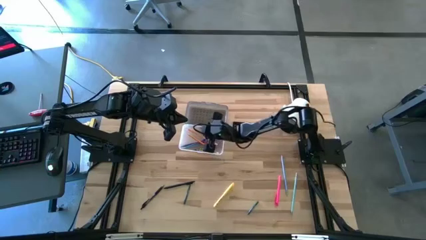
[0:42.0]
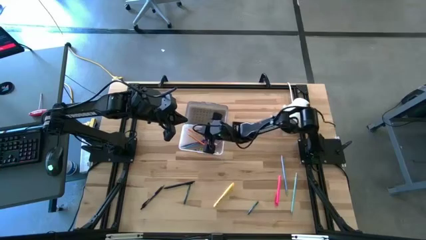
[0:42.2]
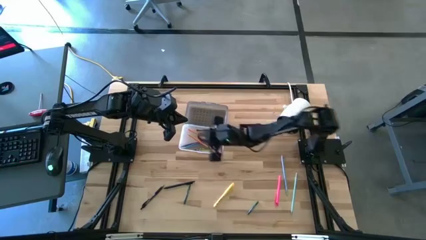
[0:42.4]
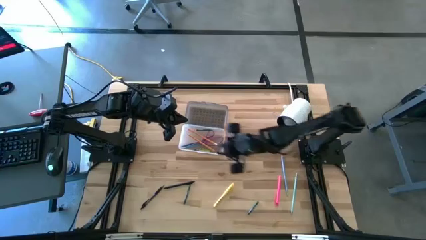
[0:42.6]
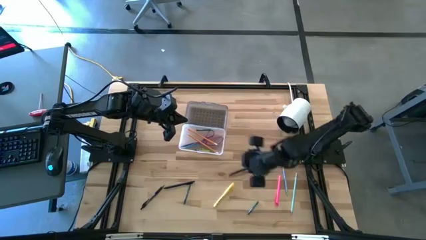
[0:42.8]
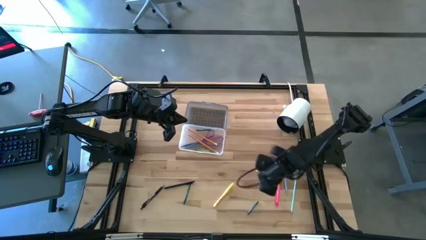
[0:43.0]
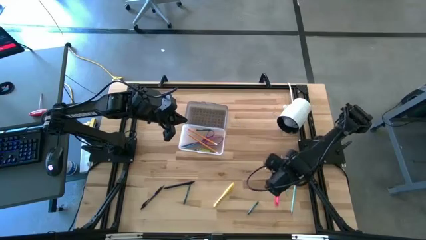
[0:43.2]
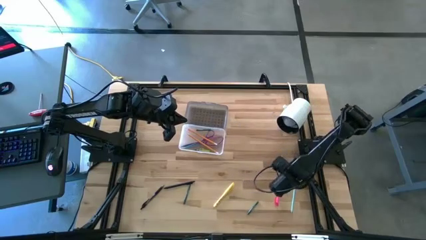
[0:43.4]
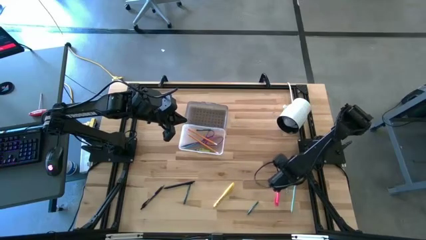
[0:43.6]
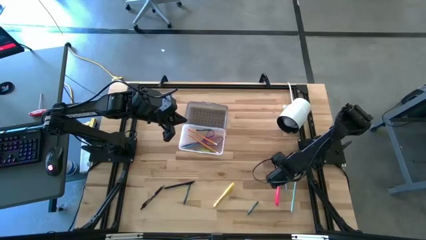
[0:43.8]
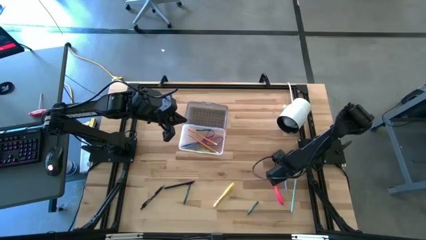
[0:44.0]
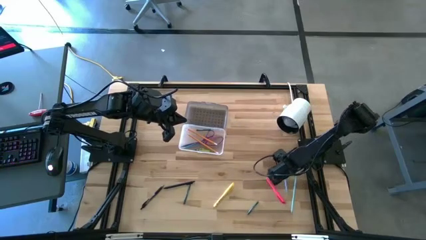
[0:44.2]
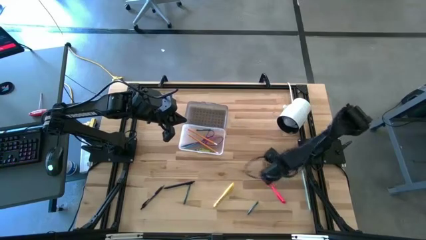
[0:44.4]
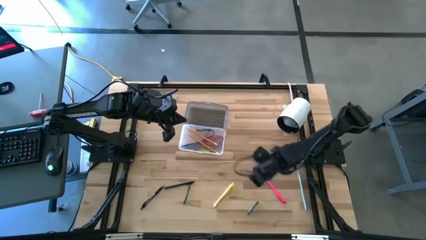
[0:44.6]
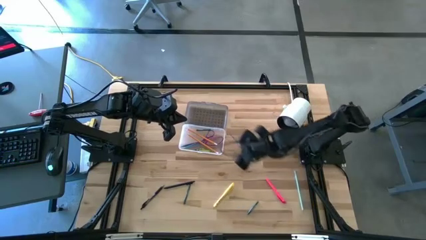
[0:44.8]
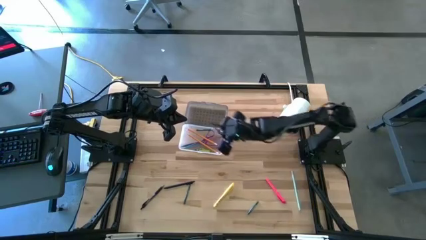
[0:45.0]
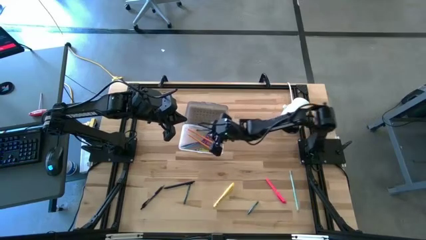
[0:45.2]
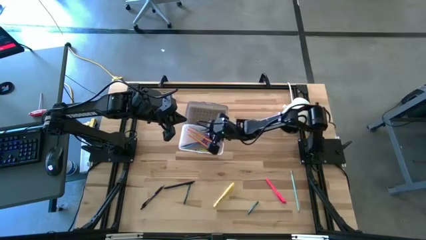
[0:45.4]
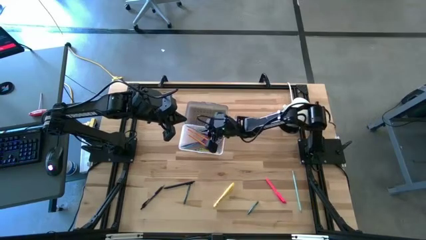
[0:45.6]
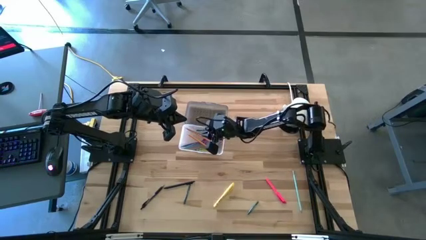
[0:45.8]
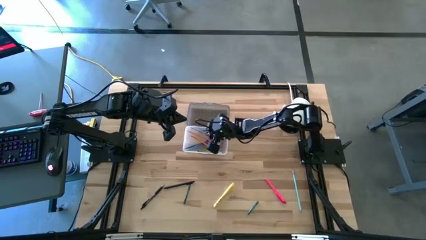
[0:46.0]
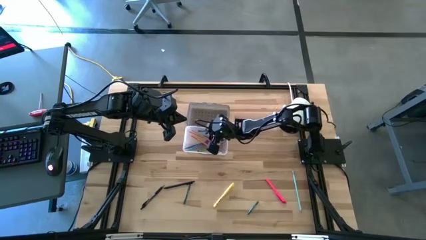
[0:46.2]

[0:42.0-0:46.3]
Task: Pick & place school supplies into a supply box
Put the blue pencil into the black box

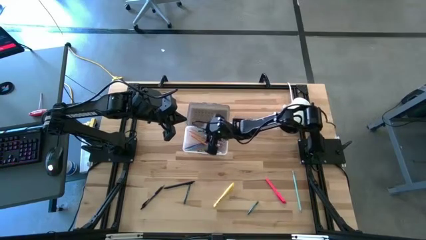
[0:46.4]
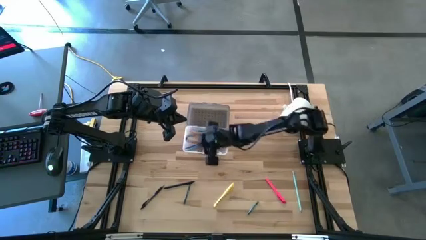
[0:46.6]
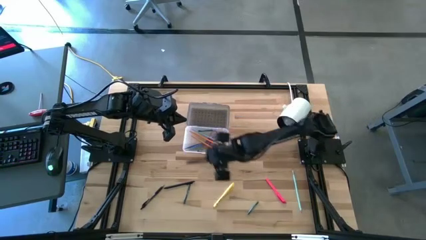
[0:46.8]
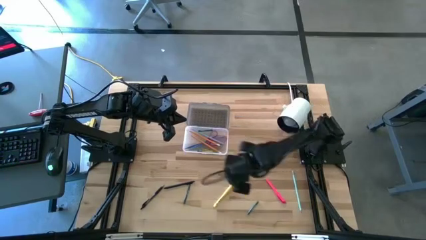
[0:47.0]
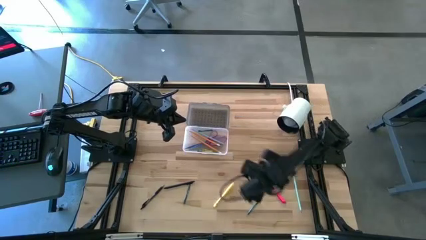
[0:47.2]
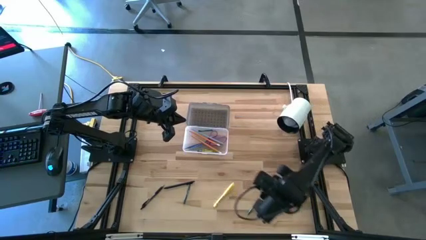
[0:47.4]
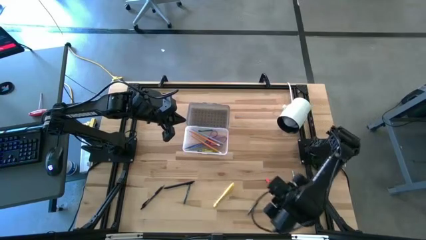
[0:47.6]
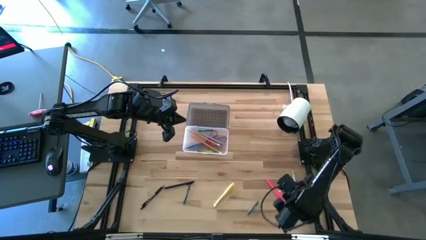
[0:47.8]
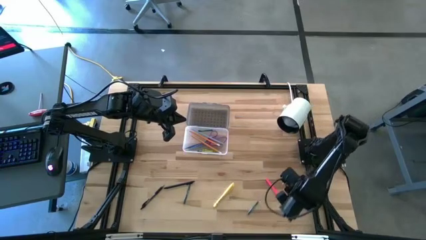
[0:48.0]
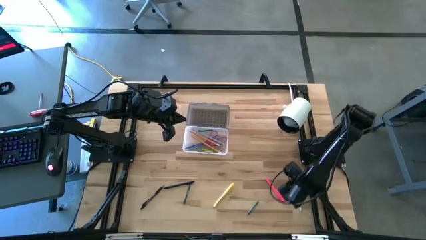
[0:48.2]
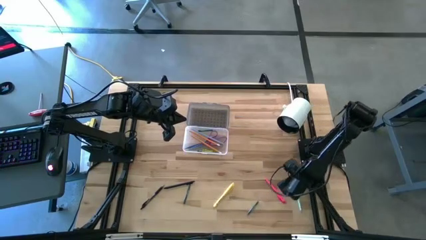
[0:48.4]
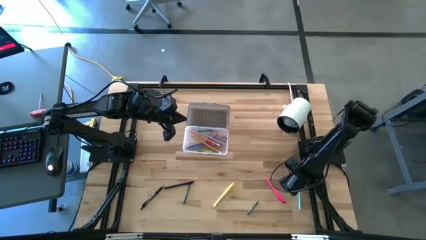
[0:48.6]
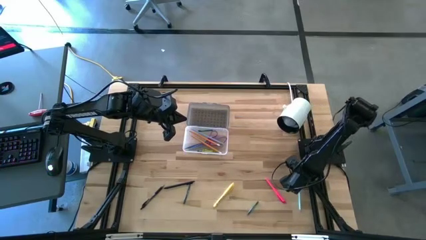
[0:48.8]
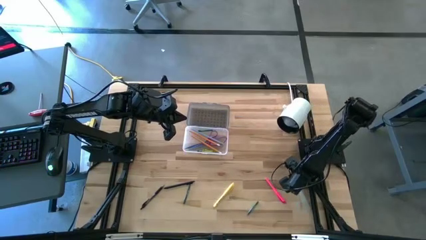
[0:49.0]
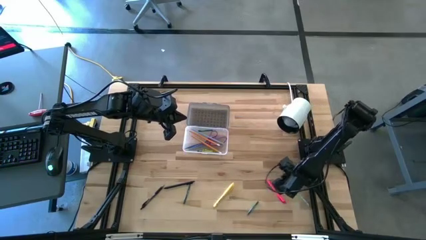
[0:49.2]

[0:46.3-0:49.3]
Put the light blue pencil into the black box

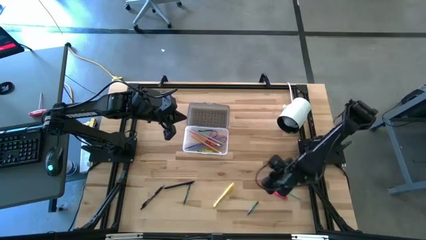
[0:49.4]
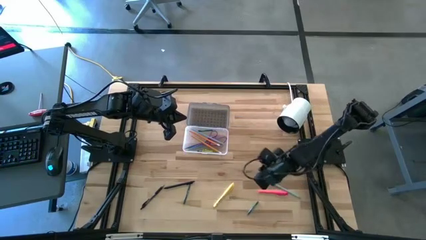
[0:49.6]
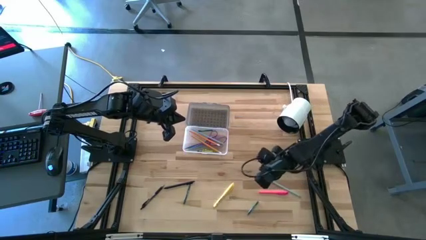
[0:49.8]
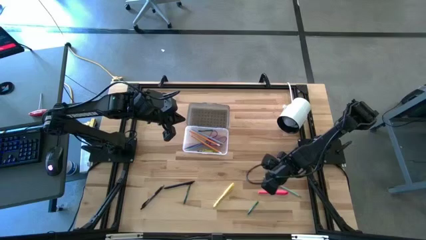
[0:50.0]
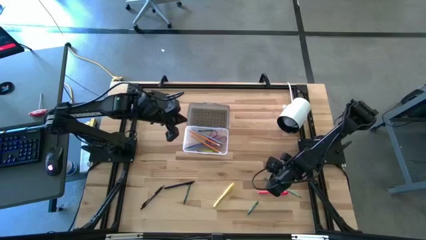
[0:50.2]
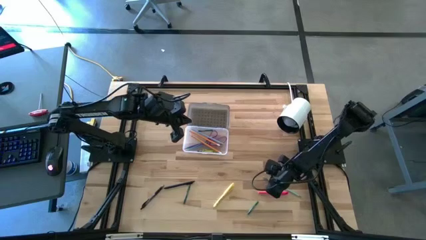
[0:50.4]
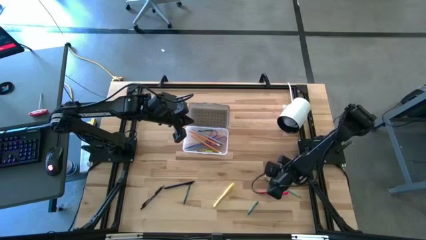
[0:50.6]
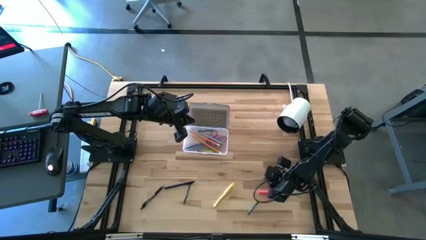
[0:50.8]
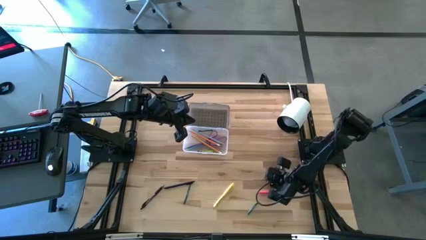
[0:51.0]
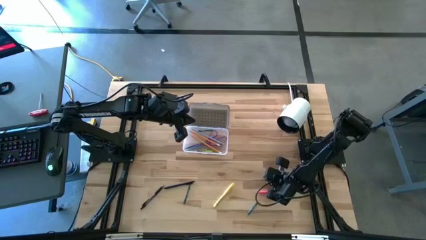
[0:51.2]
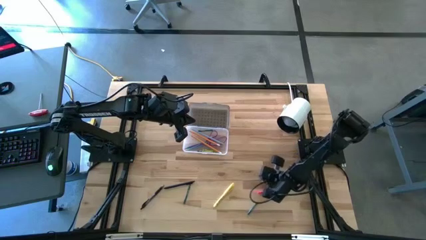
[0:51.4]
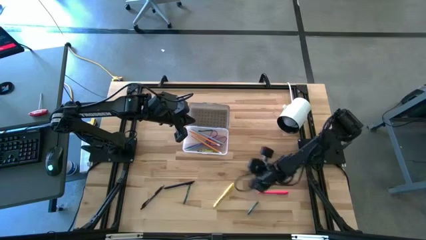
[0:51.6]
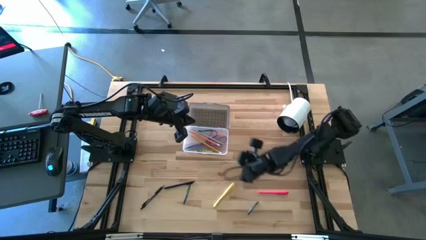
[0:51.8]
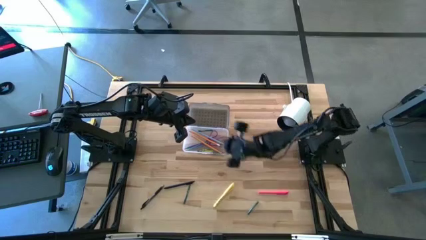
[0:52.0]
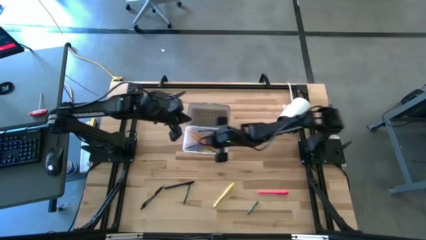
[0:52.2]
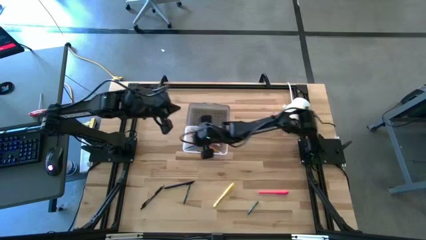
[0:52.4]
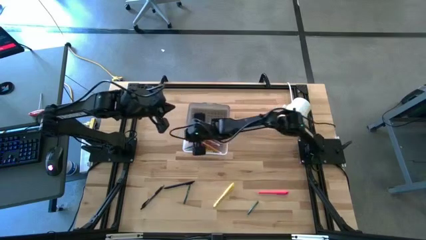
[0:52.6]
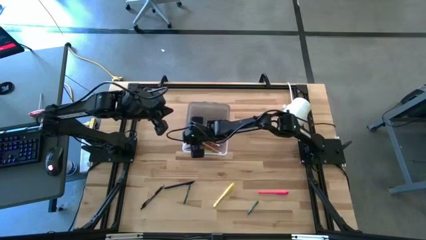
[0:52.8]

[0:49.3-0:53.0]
Put the light blue pencil into the black box

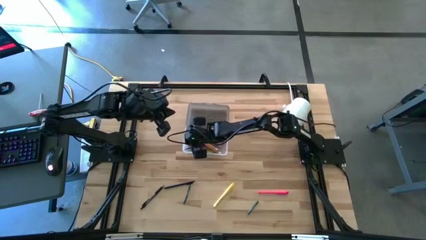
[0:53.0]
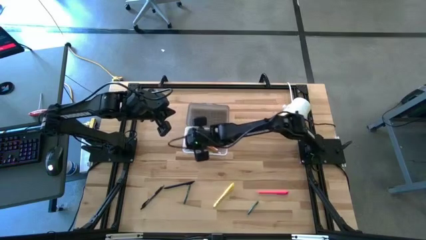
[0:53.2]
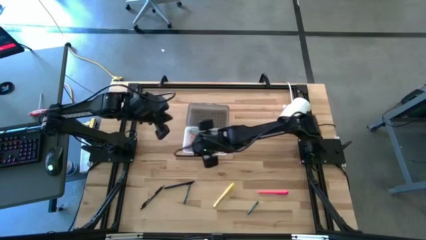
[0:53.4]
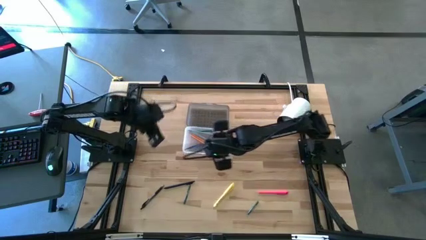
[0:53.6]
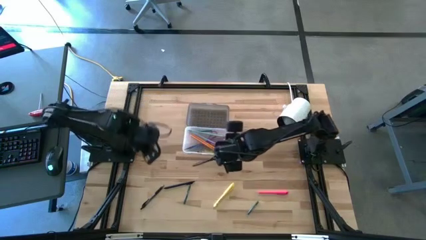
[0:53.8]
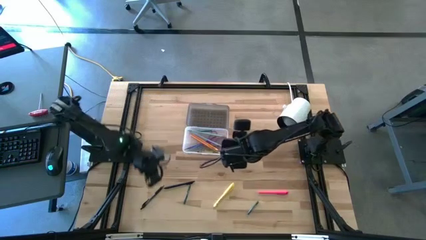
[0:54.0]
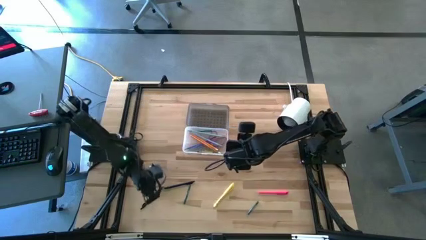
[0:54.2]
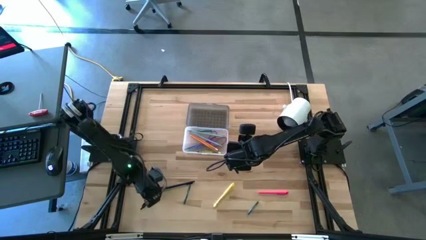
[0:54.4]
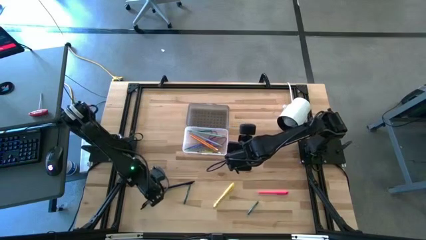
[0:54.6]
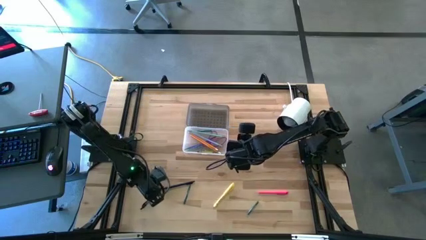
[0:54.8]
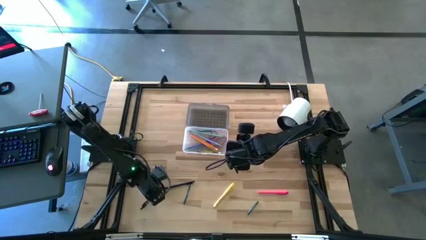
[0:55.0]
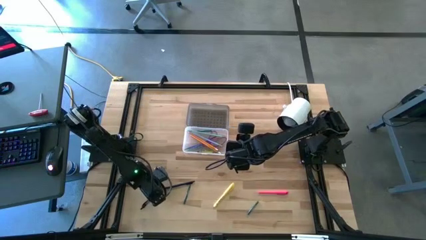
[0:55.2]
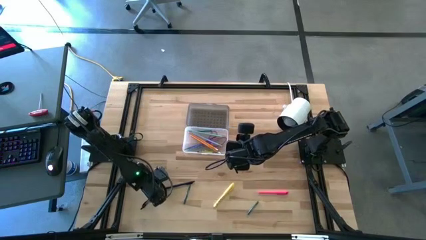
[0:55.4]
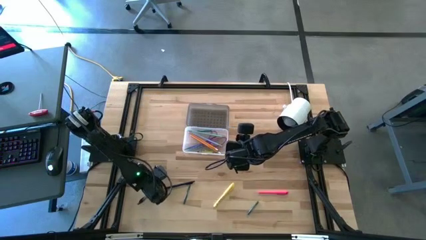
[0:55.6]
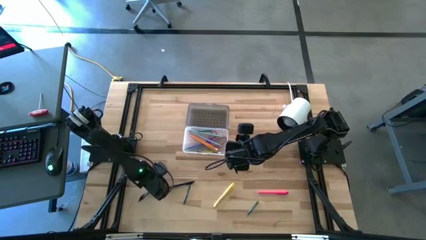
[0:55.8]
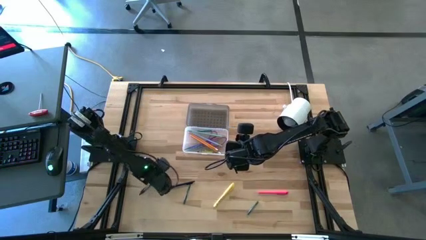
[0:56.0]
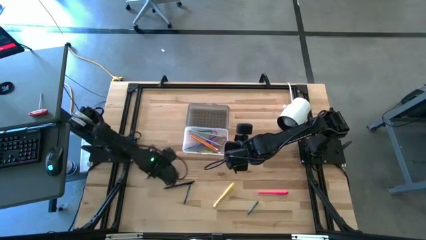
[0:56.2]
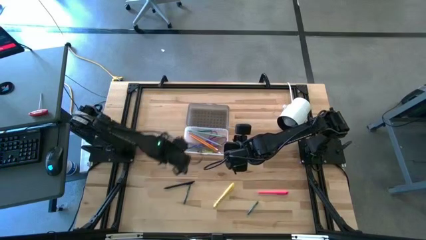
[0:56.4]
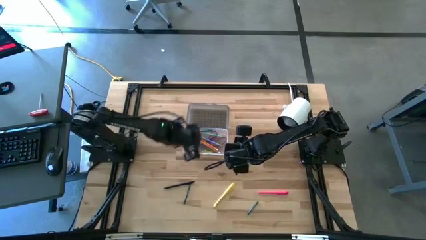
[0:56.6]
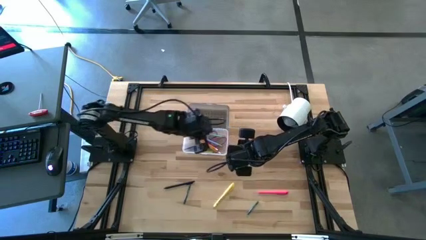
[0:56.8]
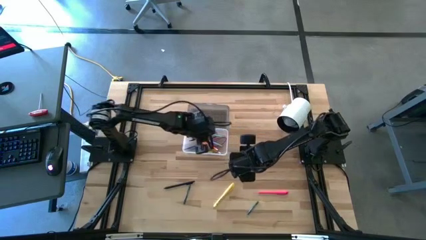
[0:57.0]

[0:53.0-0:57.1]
Put the left black pen into the black box

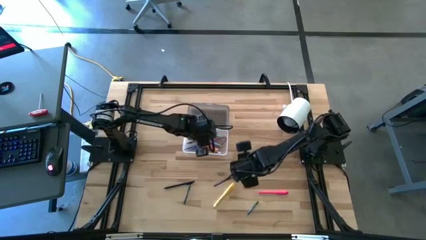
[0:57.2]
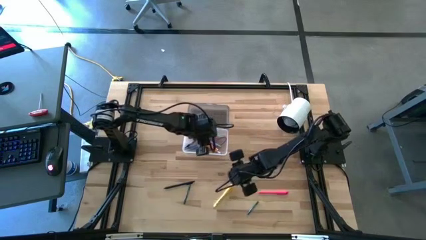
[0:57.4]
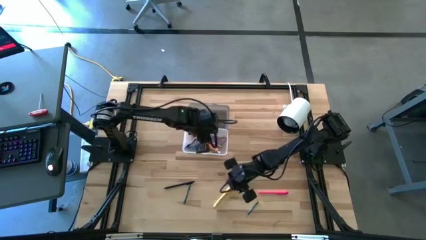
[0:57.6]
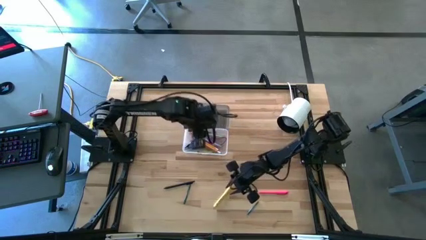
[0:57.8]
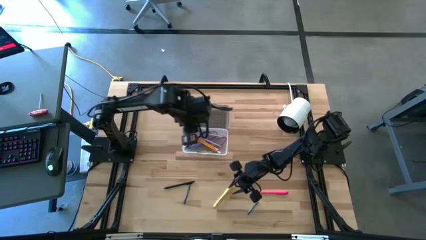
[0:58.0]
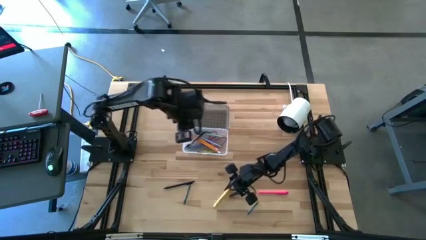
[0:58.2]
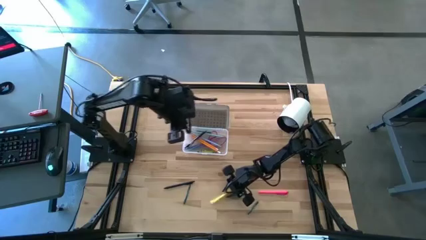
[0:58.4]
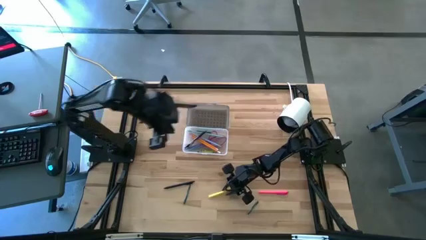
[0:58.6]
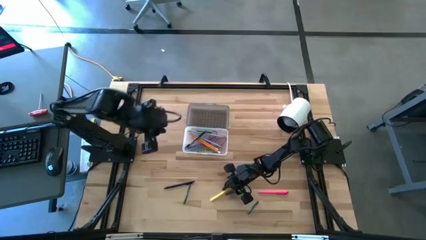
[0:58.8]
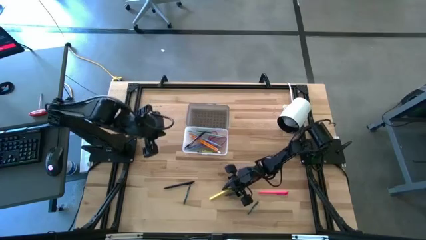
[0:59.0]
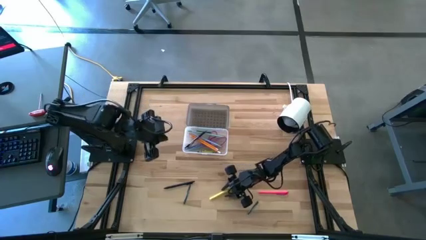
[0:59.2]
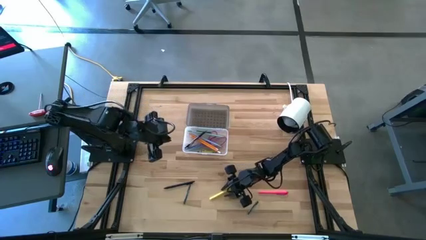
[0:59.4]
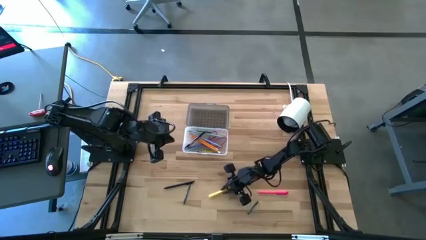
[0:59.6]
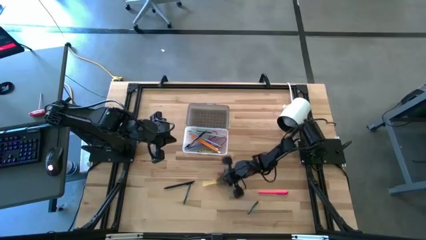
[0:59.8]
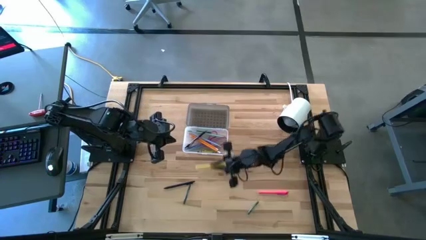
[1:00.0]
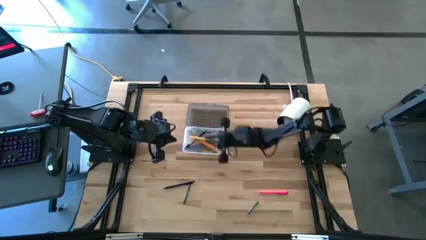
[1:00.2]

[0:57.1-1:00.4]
Put the yellow pen into the black box
